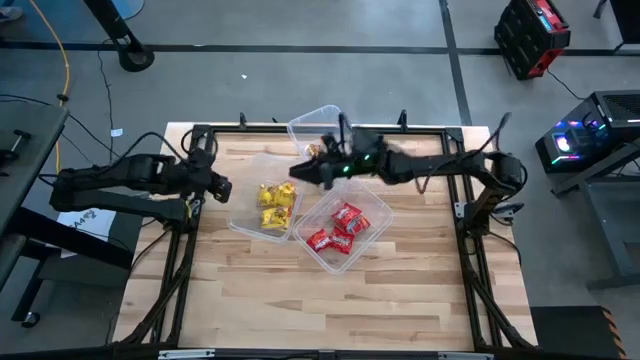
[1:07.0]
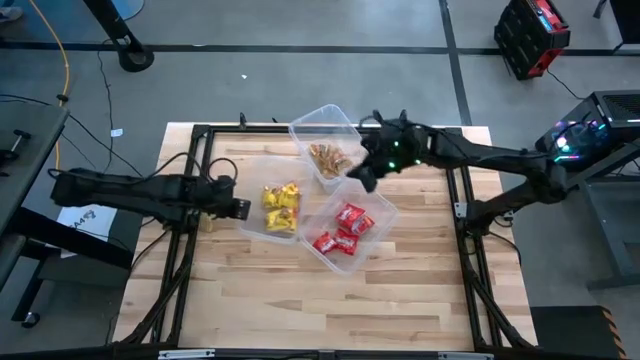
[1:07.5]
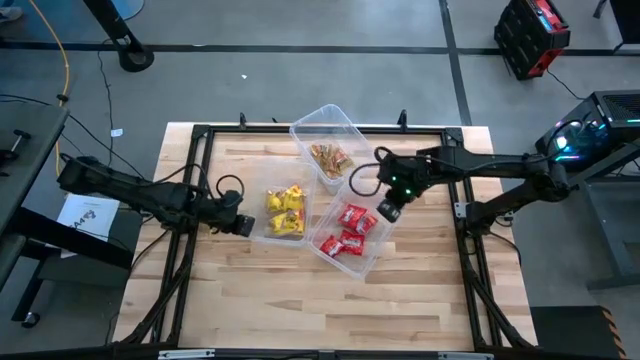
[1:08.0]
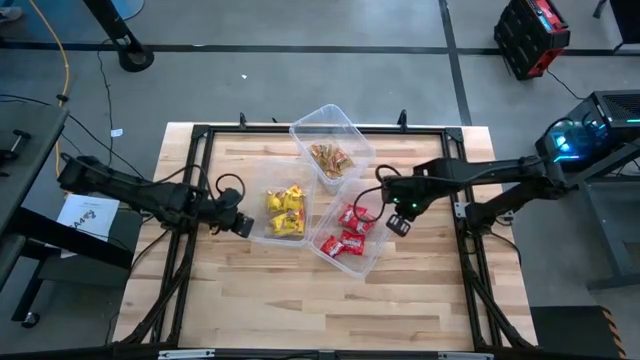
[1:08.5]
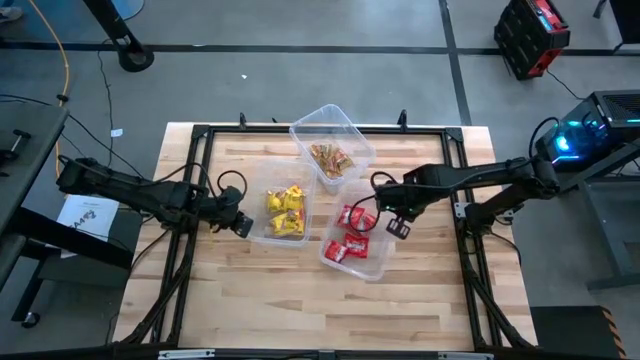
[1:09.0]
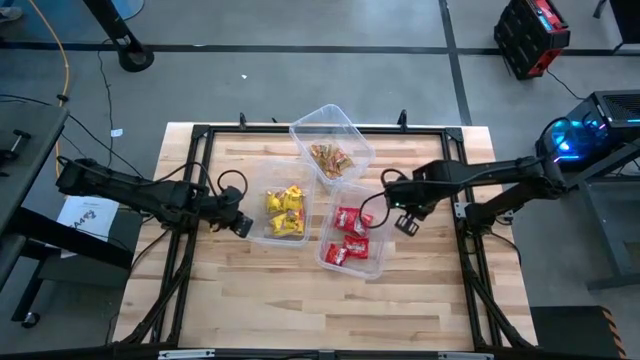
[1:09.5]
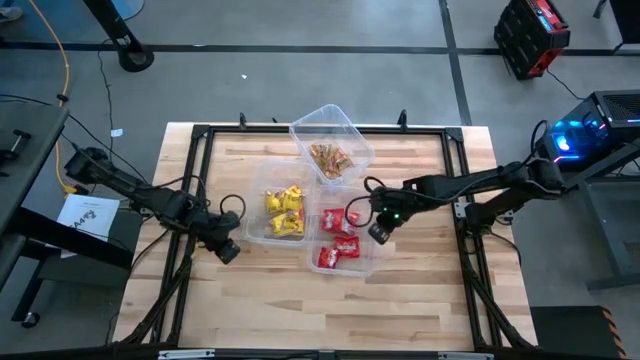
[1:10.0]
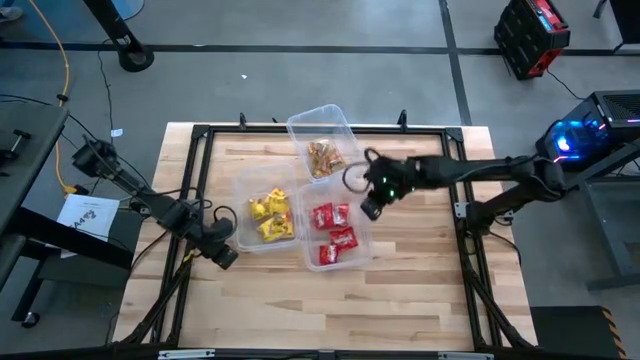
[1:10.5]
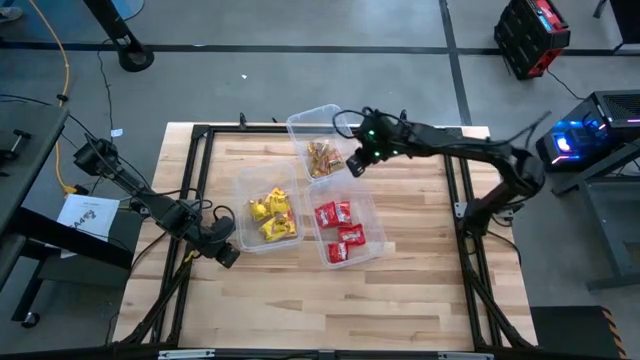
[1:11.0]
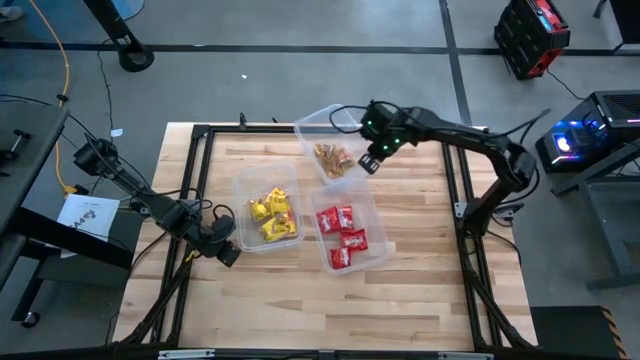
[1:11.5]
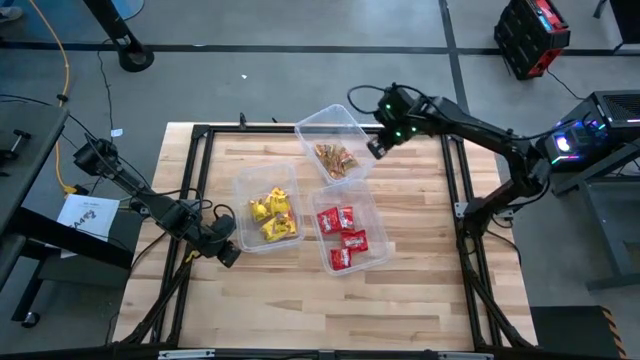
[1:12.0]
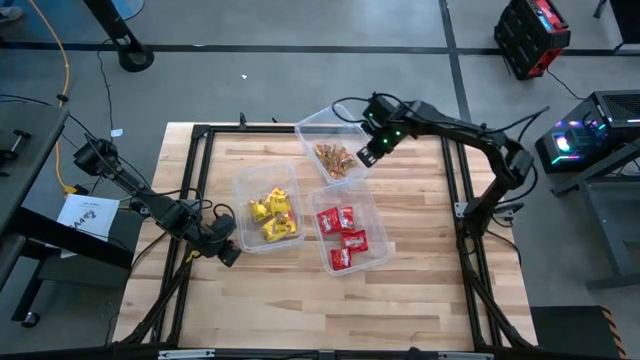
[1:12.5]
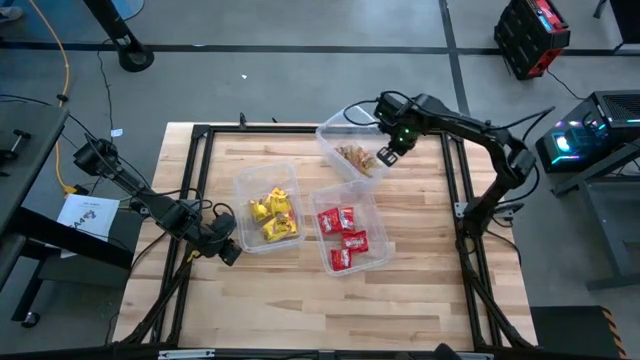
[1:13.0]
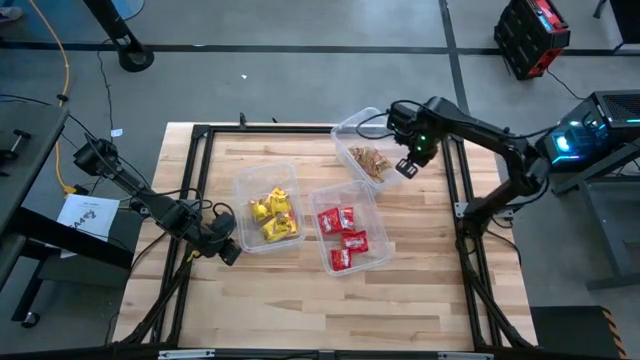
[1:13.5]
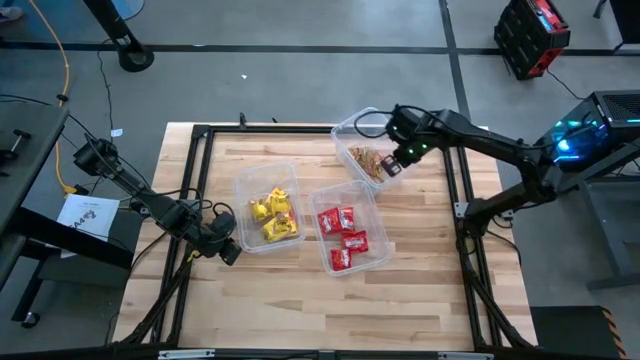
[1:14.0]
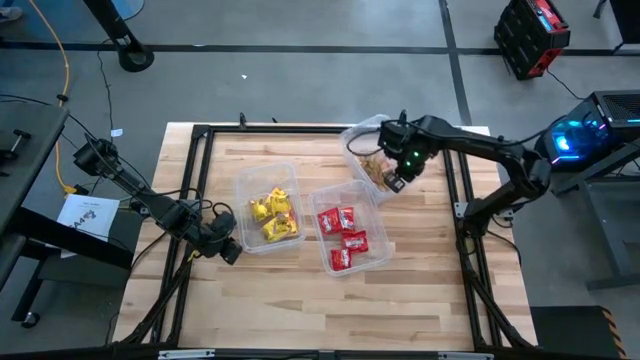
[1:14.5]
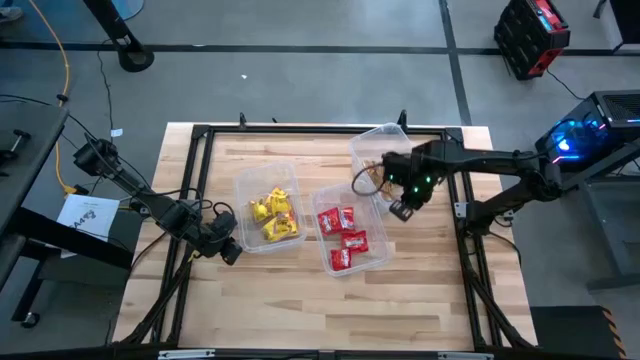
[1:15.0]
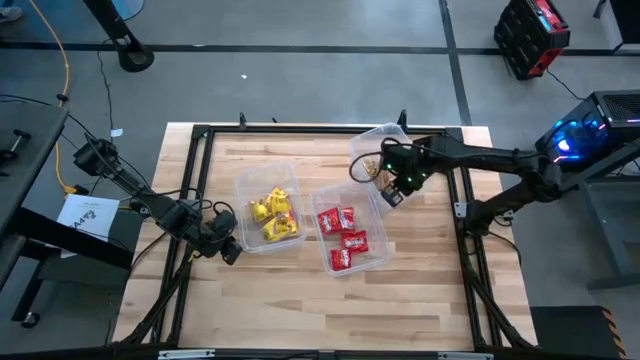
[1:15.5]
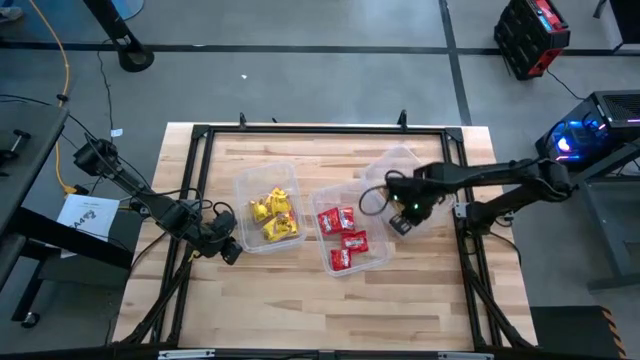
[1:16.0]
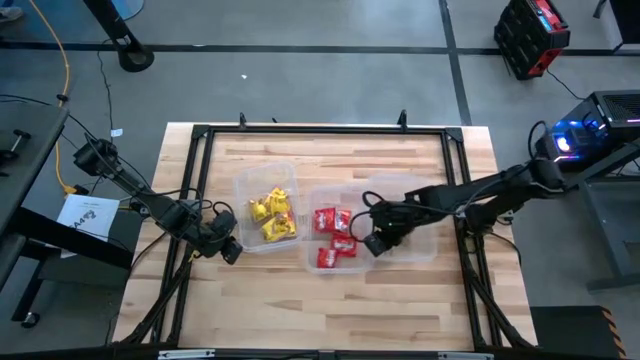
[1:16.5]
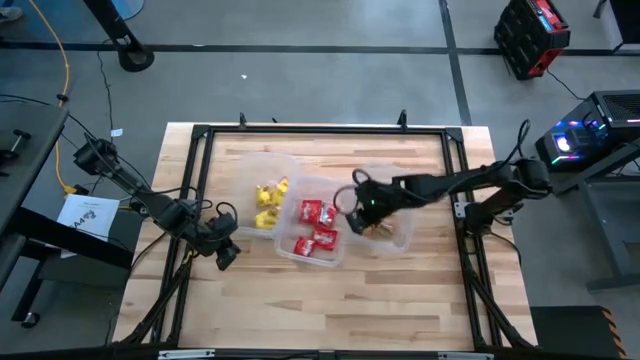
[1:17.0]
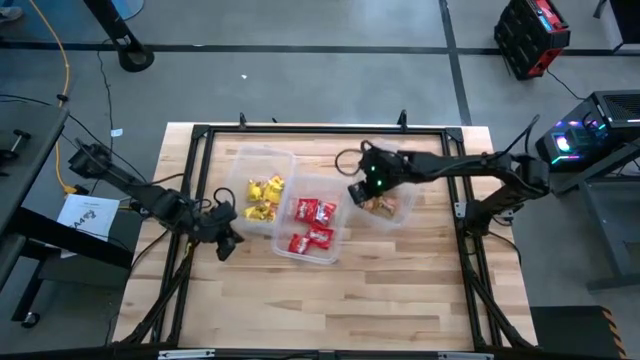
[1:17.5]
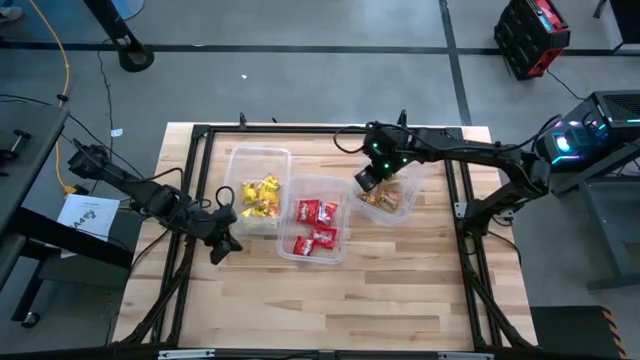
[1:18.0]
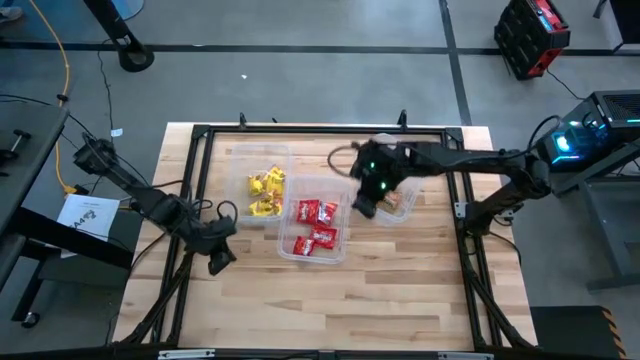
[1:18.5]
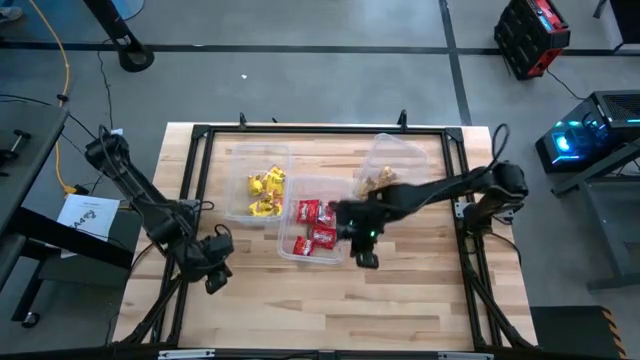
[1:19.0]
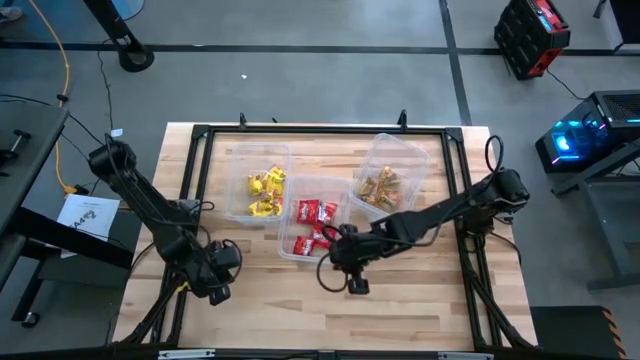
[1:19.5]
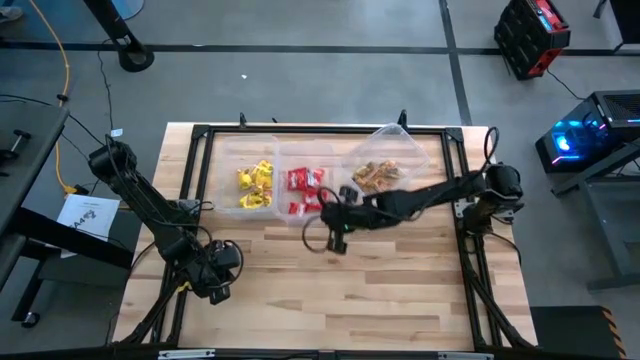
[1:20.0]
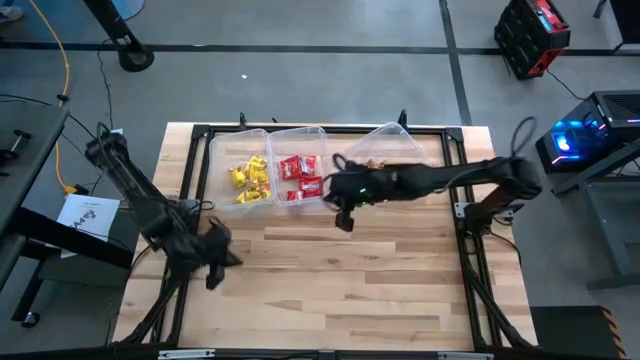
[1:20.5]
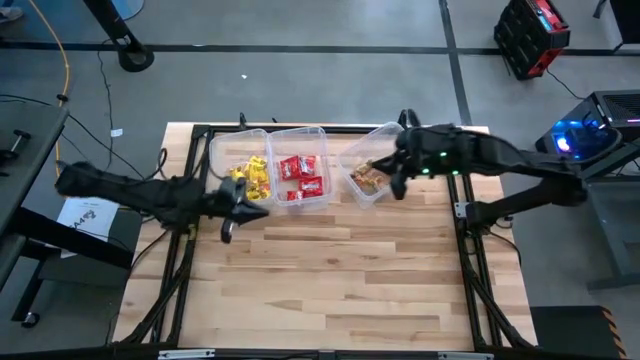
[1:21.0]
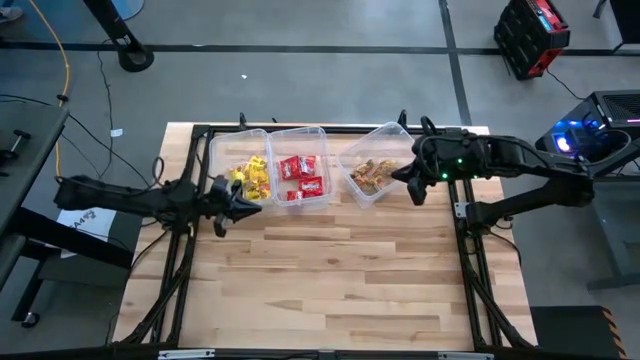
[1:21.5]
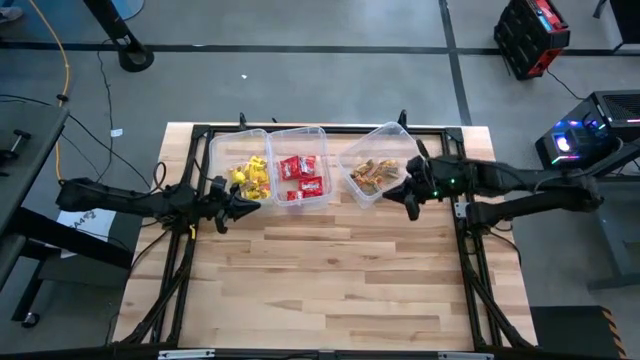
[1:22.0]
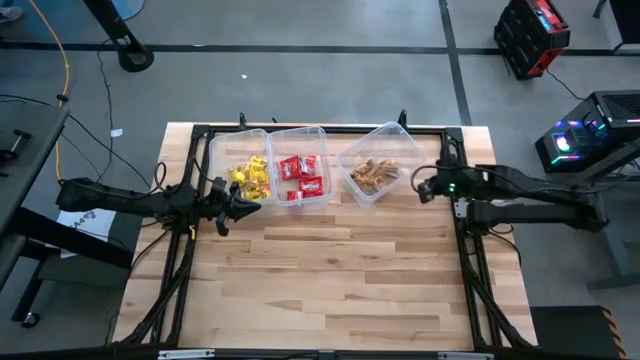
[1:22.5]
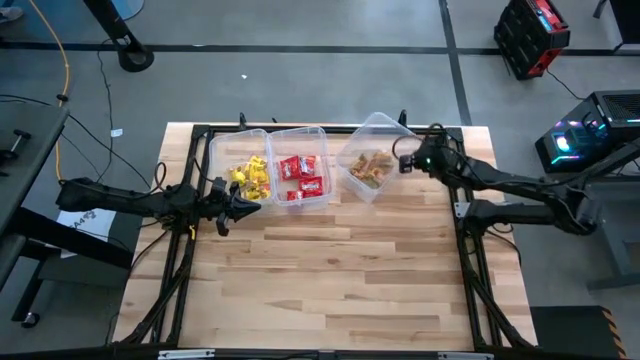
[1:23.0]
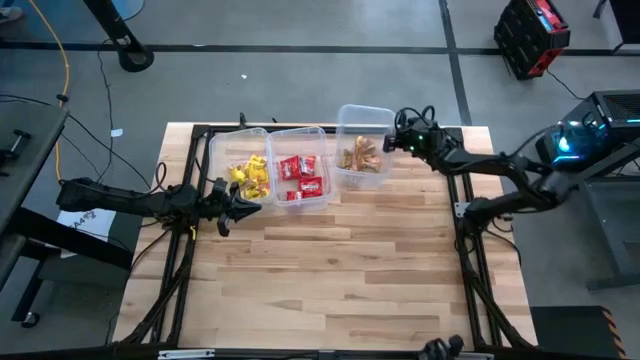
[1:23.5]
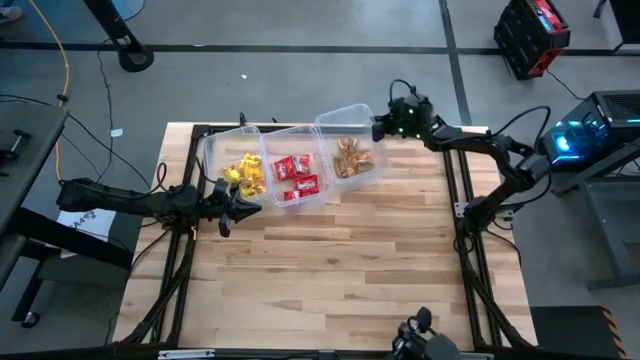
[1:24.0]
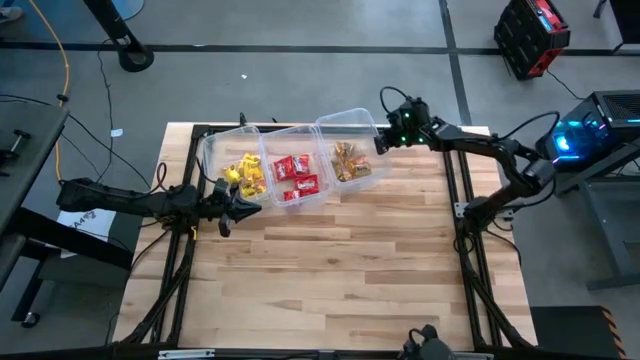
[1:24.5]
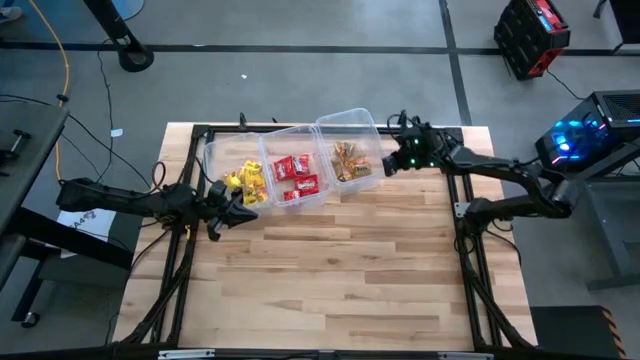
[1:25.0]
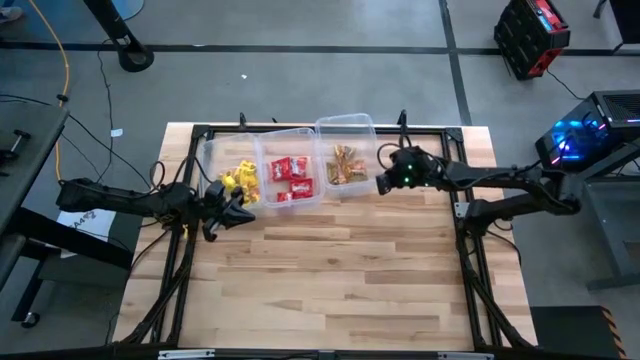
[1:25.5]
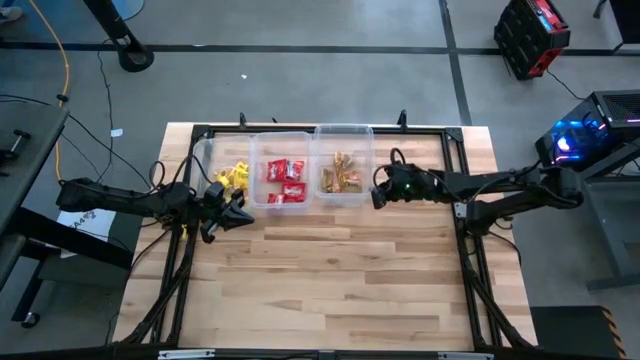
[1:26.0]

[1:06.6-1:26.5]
Task: Sort candy
Adjust the transparent bins

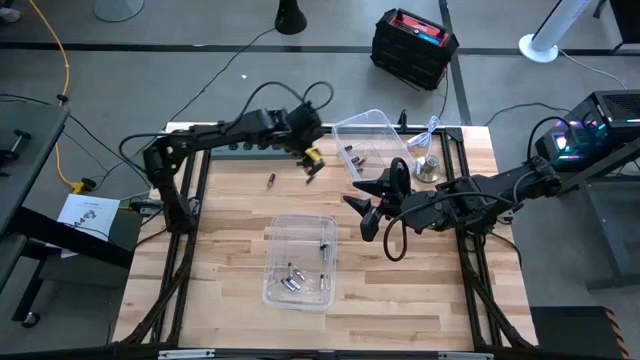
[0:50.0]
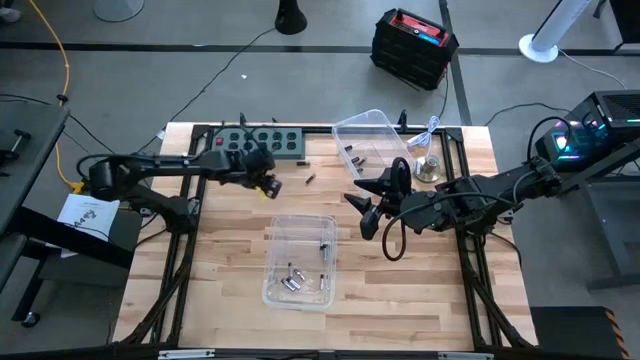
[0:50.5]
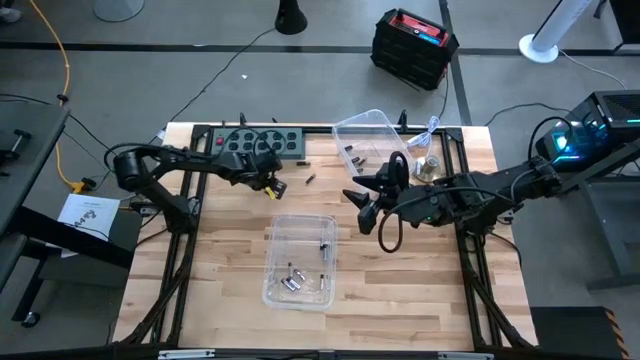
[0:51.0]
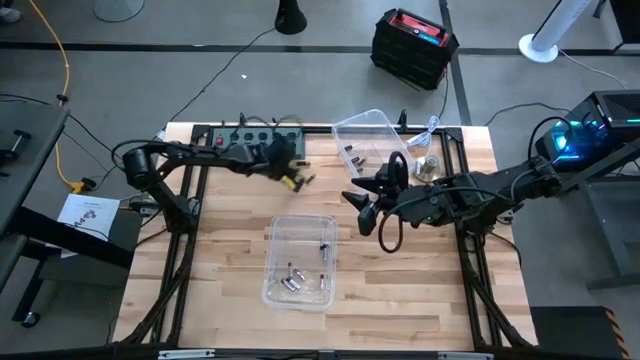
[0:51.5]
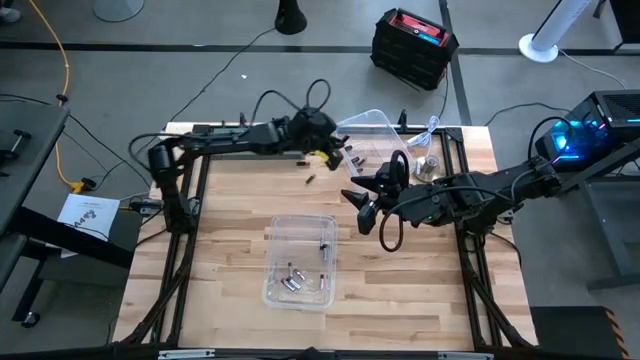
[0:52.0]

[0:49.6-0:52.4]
Task: Sort batteries
Put the black battery into the right transparent bin

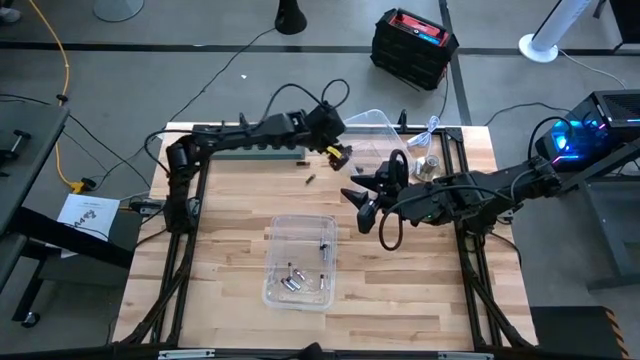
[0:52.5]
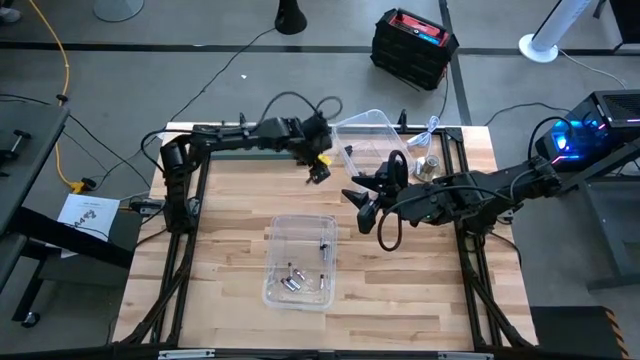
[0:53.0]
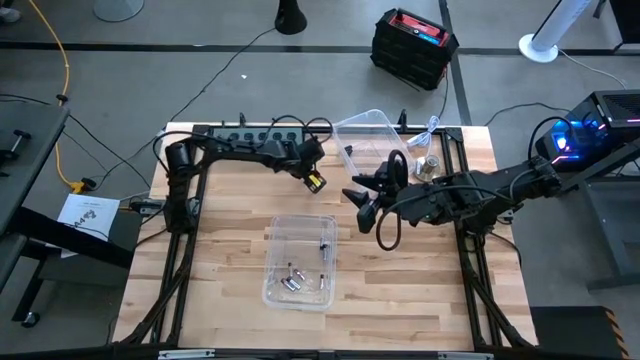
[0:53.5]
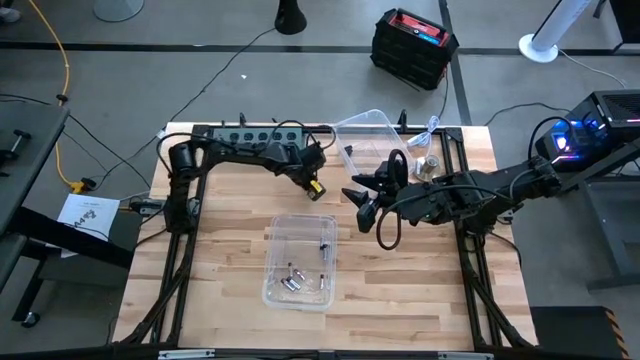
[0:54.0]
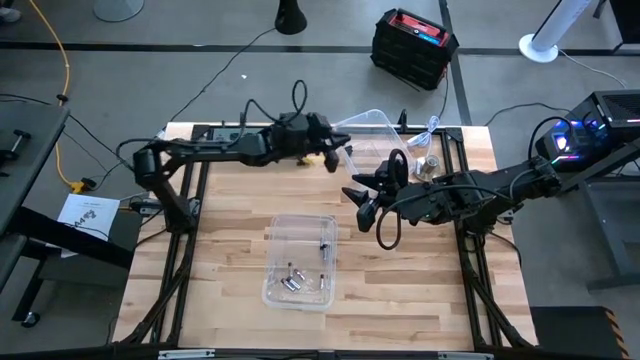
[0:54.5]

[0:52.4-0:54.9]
Put the black battery into the right transparent bin
